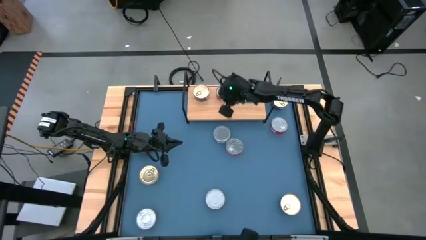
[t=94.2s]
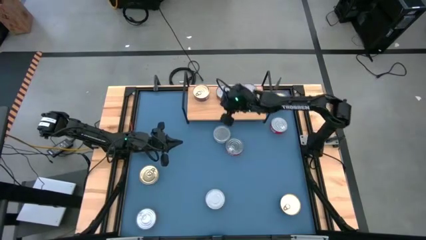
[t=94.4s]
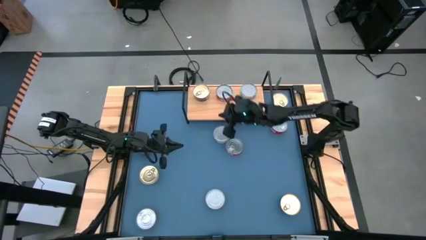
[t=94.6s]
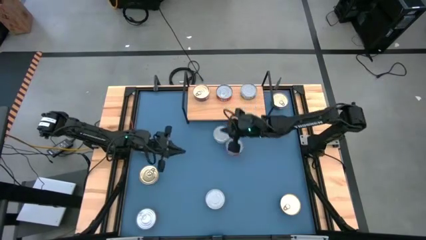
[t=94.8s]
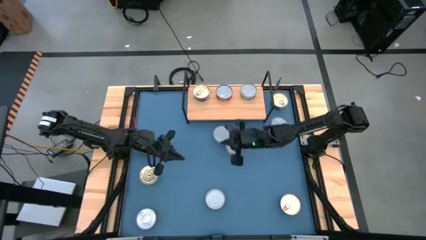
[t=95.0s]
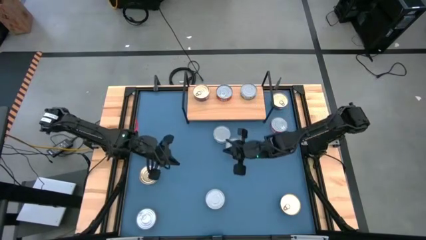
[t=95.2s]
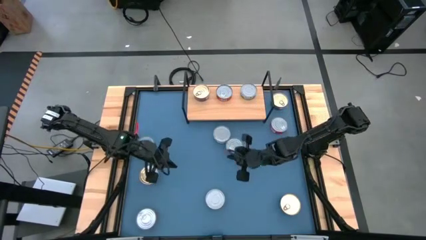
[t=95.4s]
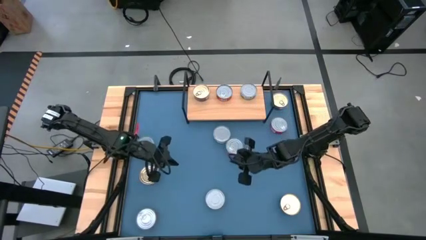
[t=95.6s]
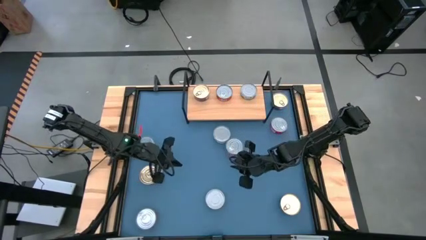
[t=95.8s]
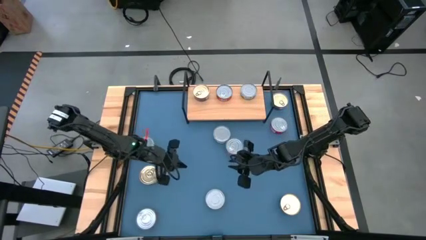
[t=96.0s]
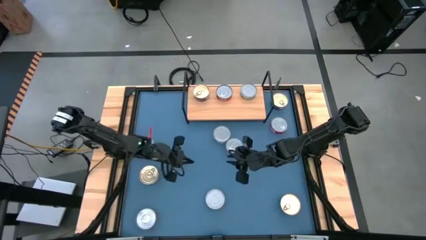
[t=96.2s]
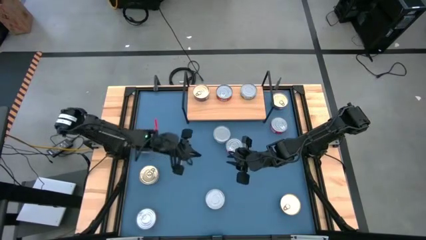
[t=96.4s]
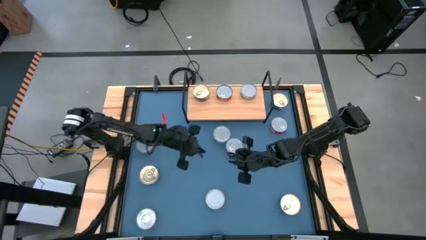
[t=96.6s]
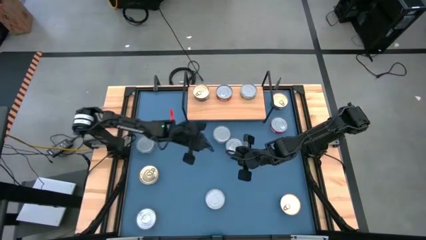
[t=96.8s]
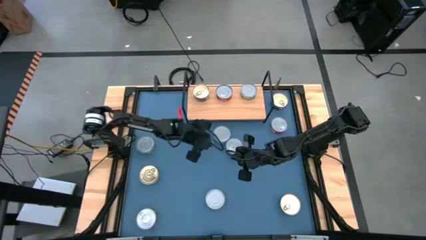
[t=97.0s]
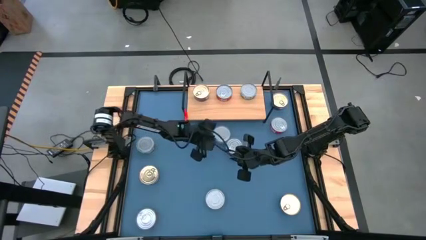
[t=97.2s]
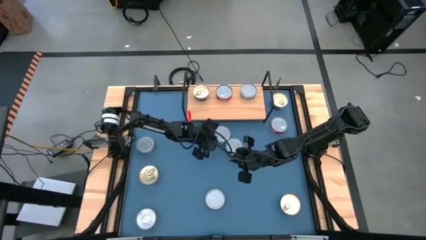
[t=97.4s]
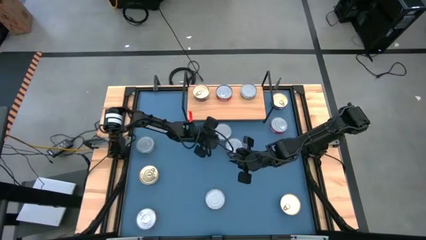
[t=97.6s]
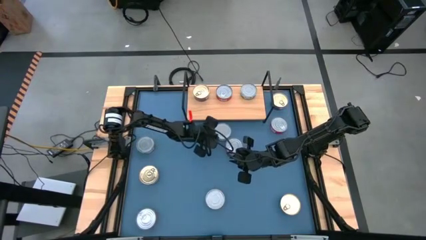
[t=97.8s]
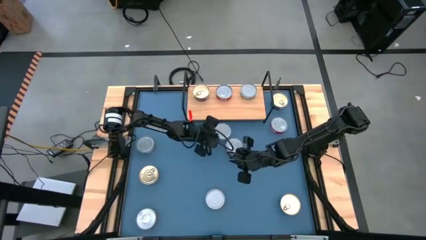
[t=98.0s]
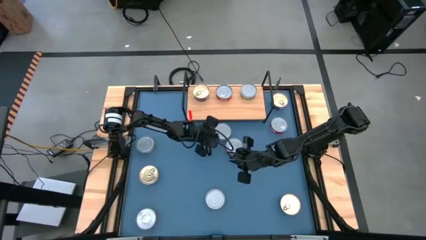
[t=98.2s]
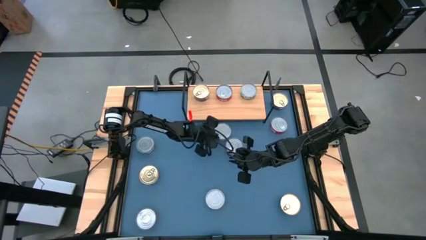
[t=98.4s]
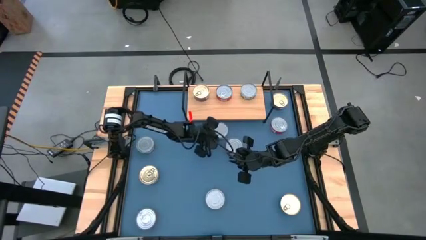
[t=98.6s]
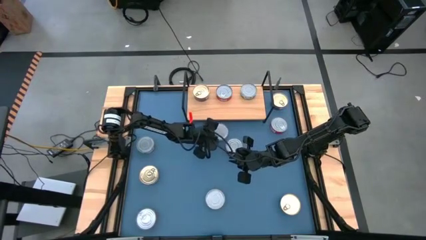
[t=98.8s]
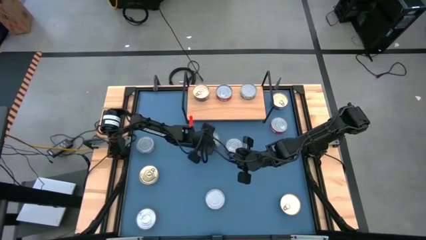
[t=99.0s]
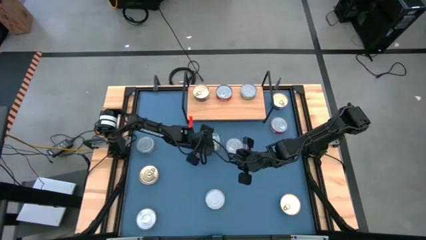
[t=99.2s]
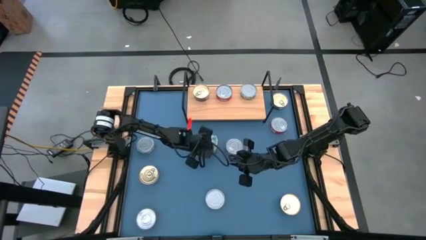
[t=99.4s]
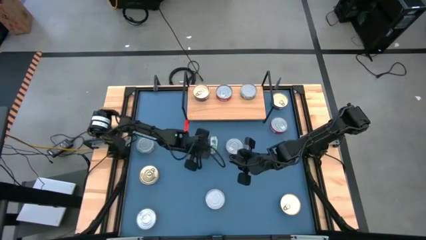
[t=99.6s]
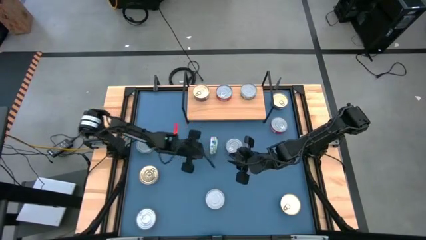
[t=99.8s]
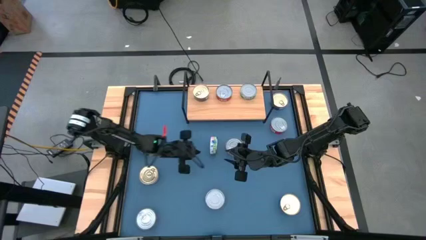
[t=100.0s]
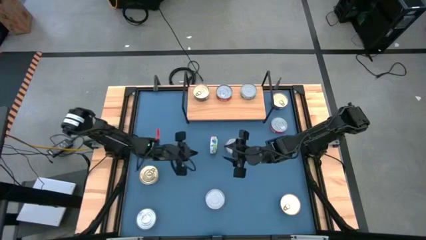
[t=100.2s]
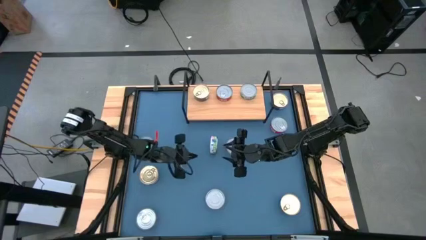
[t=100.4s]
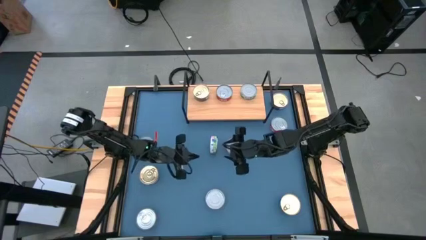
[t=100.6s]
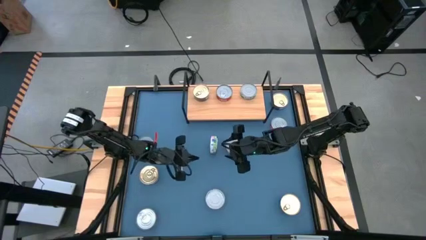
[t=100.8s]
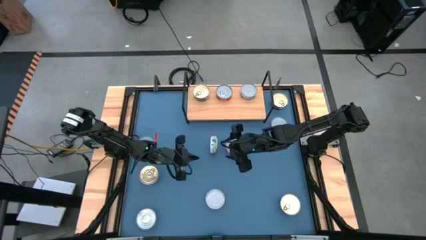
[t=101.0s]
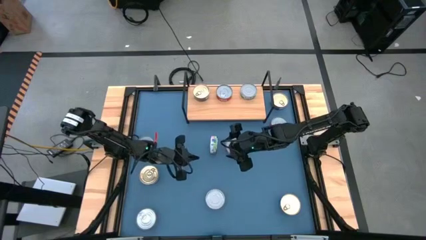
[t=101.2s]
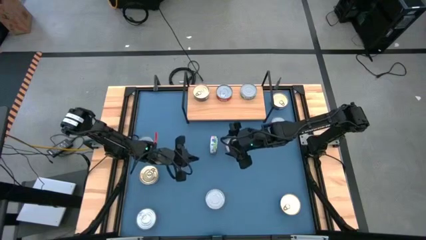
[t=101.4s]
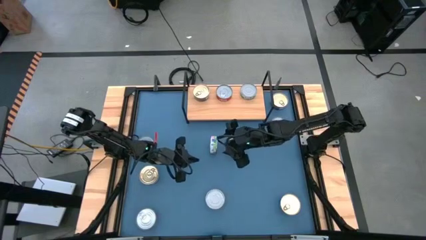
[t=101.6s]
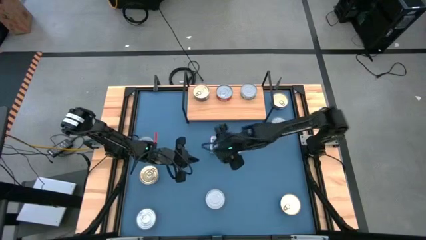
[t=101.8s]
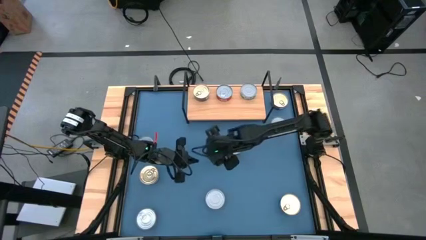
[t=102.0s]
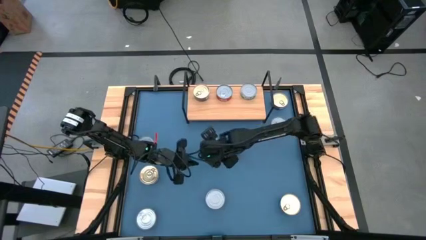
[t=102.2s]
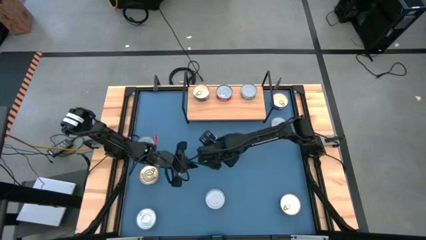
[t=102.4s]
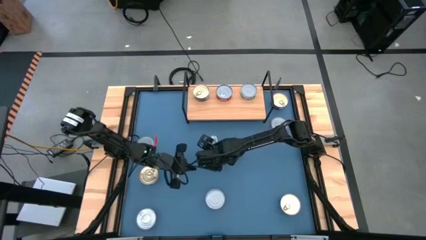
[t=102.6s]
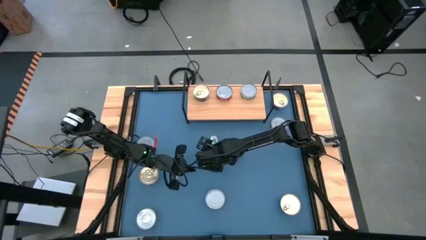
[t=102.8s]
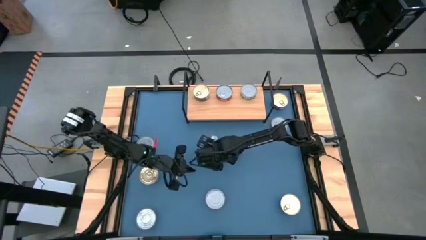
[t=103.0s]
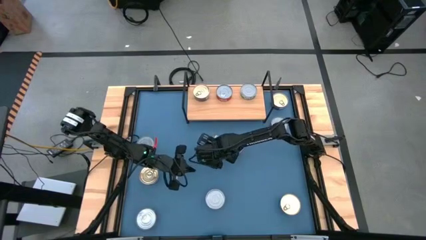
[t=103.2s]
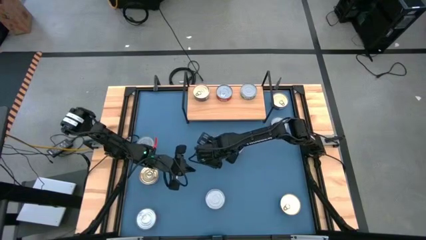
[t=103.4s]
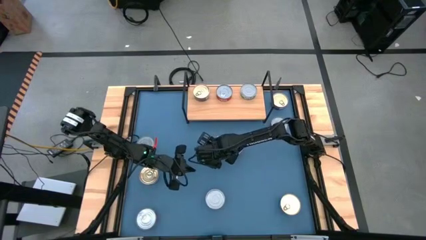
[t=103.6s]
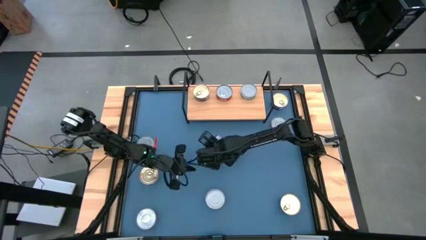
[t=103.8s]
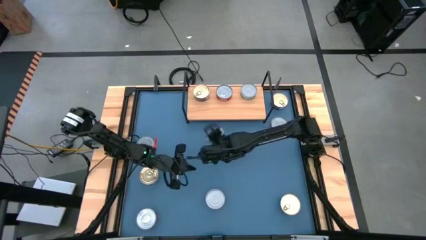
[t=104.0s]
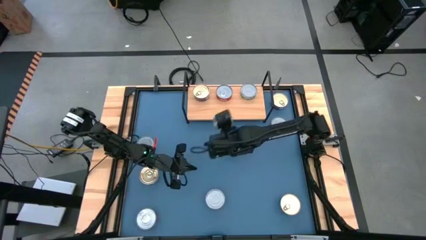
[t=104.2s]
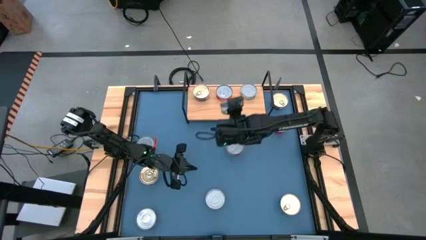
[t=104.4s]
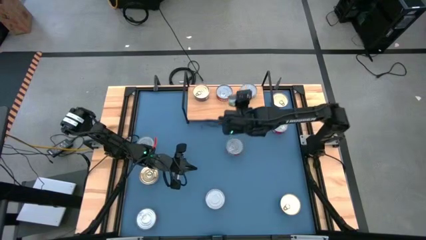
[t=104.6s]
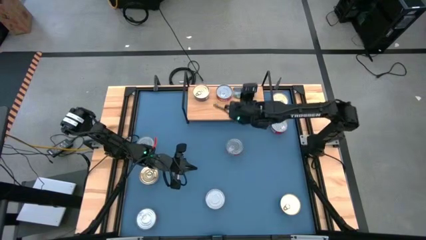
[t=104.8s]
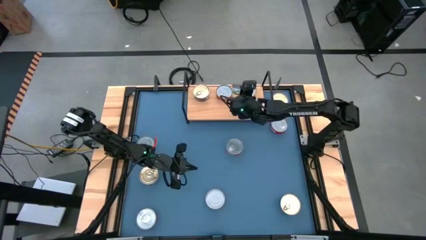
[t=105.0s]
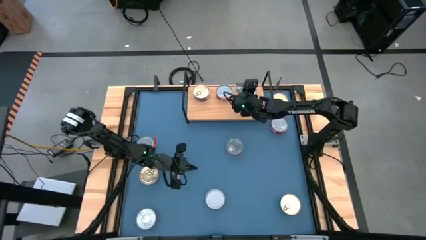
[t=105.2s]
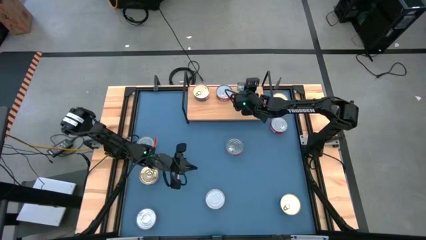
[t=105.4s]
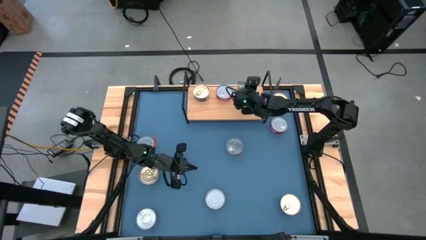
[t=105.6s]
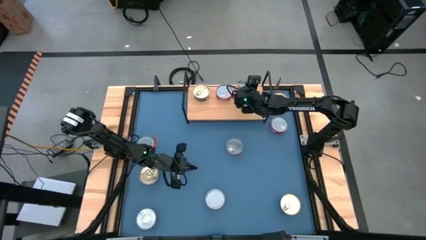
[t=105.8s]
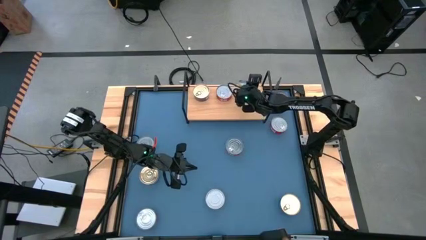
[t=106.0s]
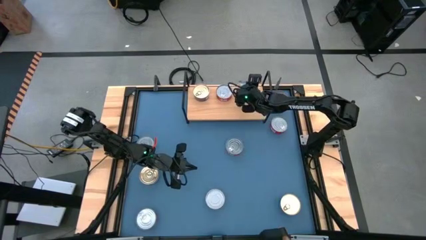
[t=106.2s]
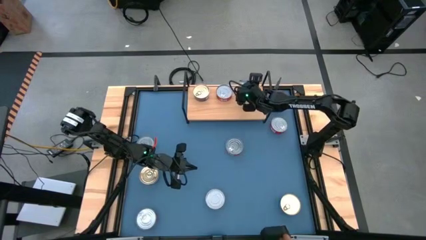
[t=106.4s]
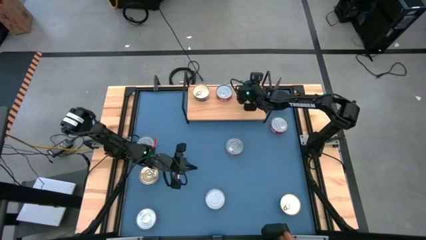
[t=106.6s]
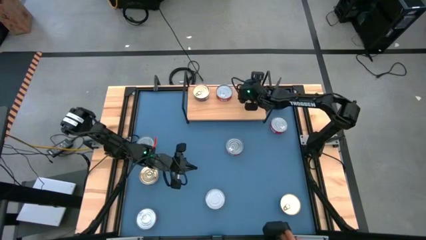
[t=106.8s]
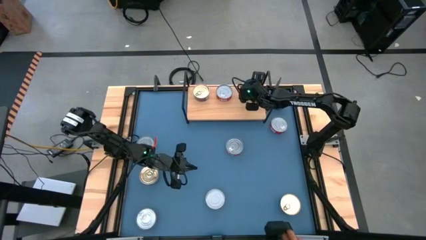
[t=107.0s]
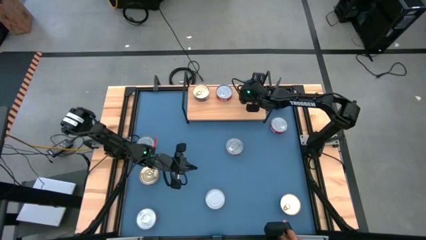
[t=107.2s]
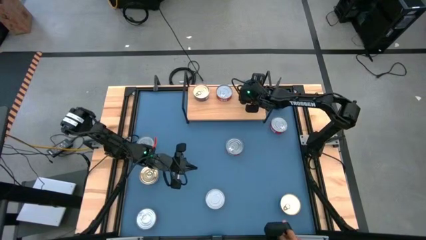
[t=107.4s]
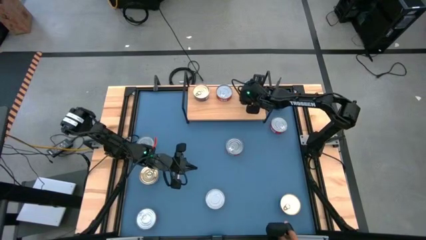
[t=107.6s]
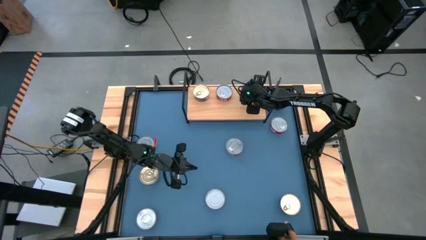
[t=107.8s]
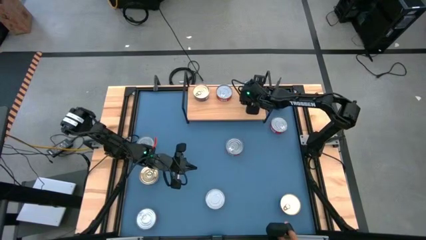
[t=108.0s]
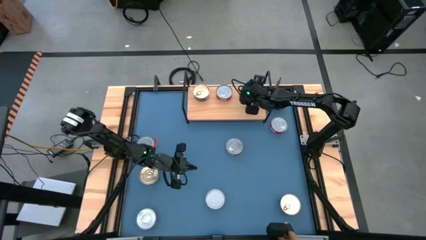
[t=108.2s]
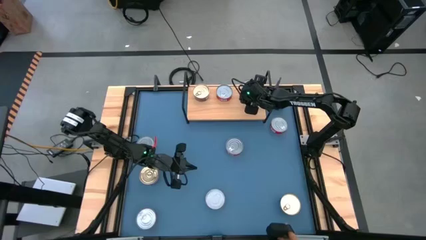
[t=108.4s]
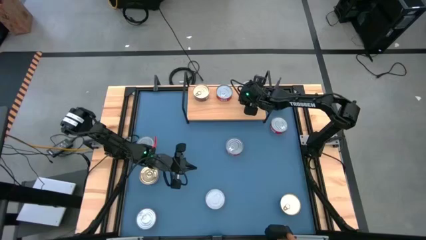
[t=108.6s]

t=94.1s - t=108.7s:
Task: Stack canned seafood by type on shelf
Stack the green tuna can on top of the other green tuna can on the shelf

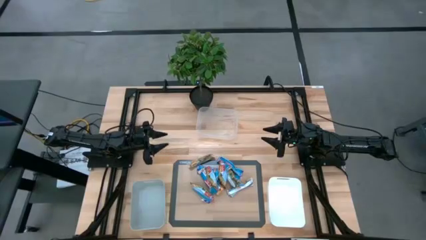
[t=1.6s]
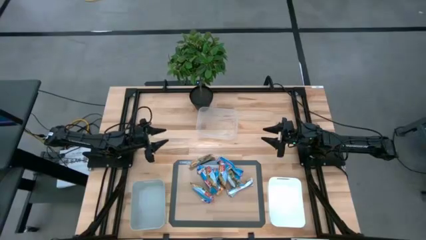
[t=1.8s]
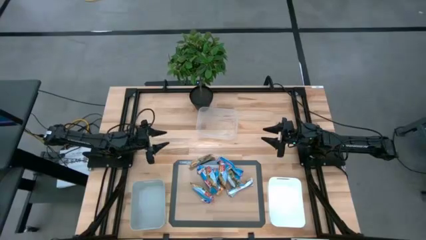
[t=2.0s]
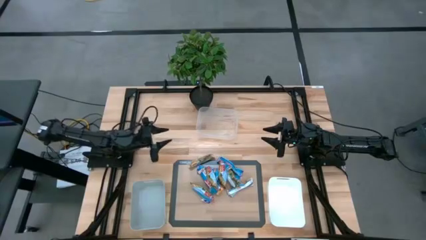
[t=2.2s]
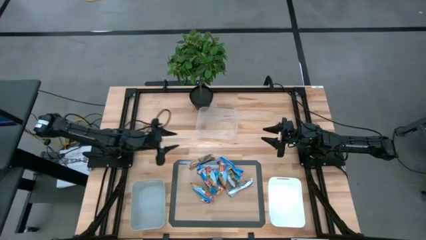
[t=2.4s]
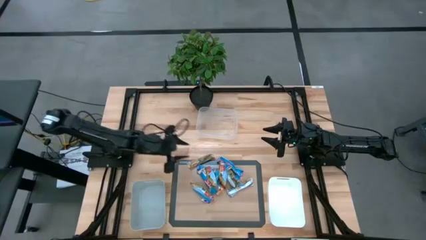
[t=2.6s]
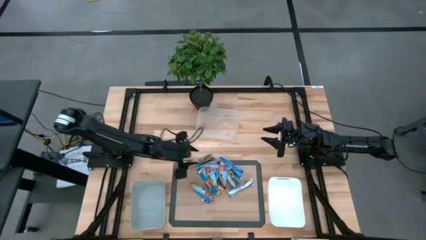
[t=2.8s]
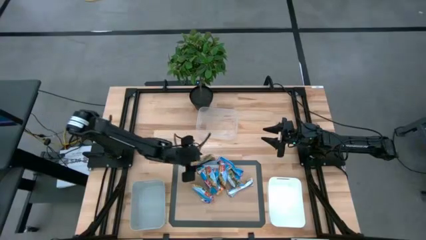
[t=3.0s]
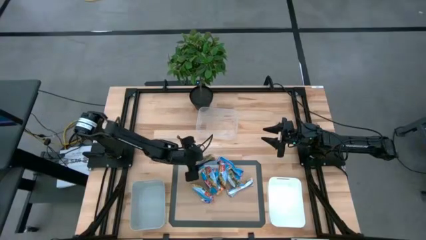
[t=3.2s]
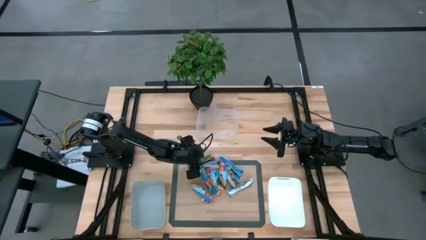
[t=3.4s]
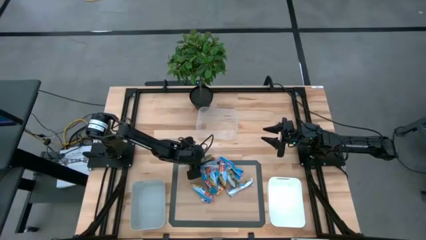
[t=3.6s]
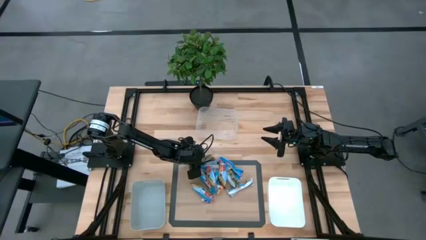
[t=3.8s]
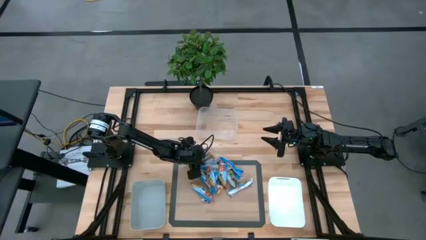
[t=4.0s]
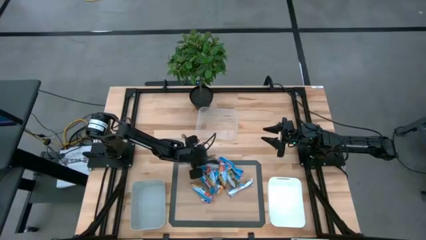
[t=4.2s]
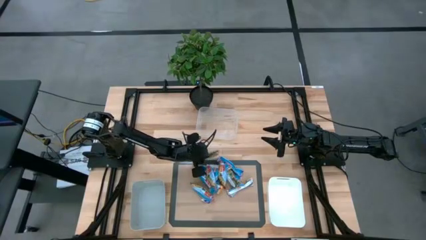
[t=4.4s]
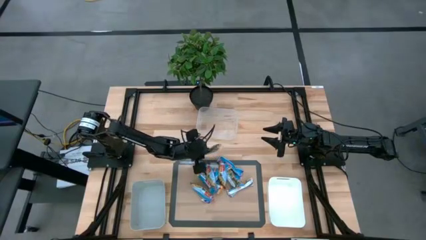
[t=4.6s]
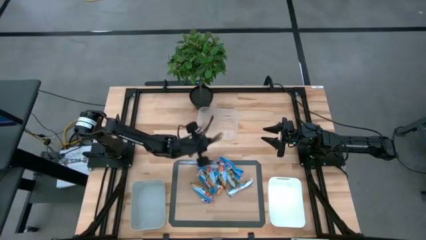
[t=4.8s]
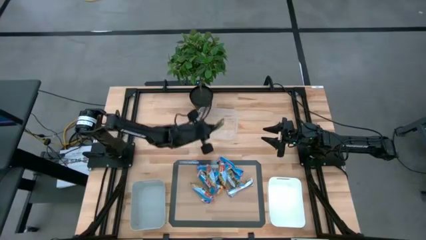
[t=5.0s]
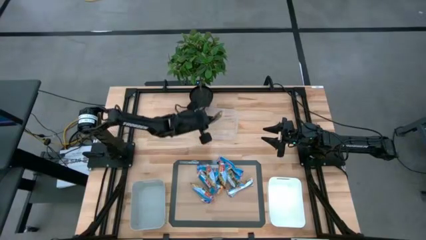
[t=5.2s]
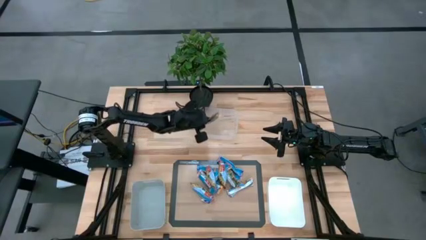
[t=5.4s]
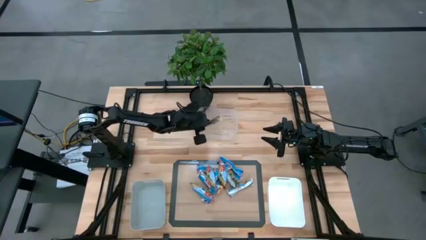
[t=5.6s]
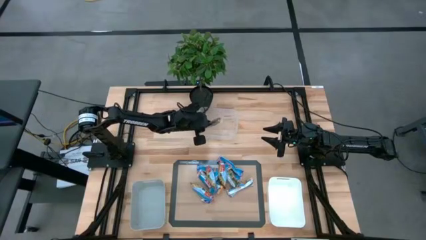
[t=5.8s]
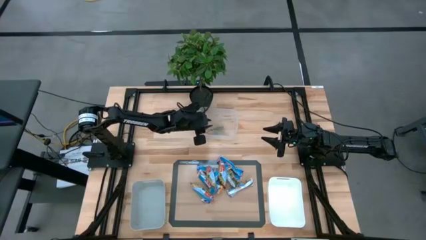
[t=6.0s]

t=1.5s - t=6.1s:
Task: Pick and place Granola Bars by type
Put the orange granola bar into the transparent bin
